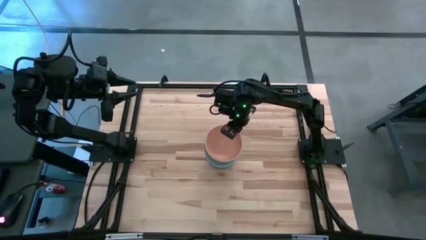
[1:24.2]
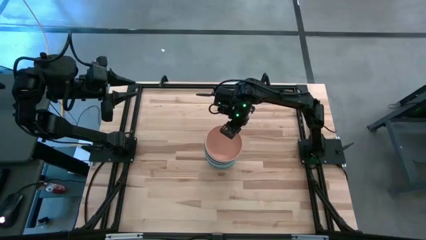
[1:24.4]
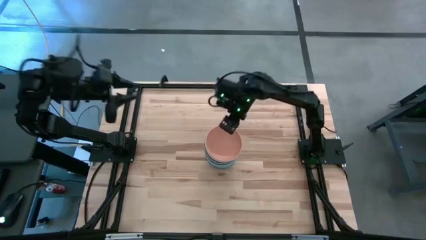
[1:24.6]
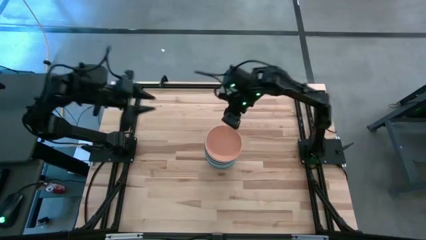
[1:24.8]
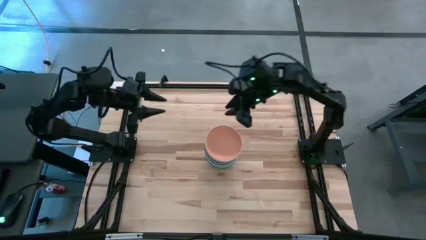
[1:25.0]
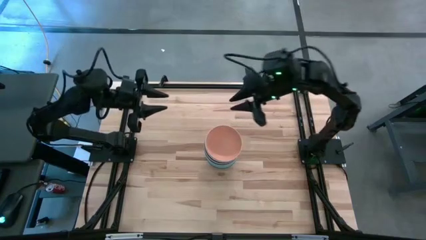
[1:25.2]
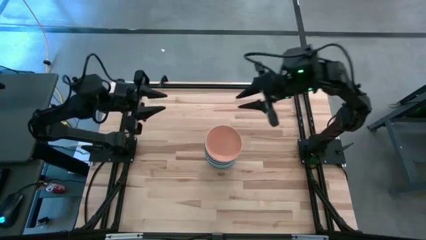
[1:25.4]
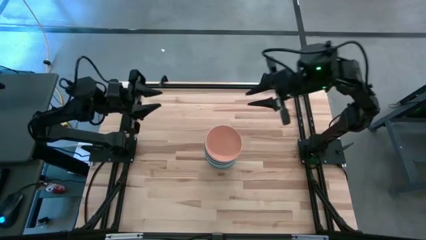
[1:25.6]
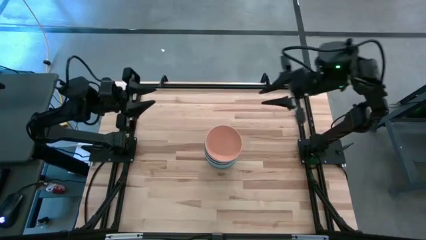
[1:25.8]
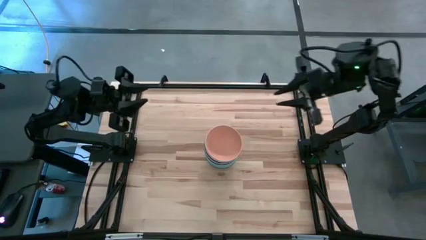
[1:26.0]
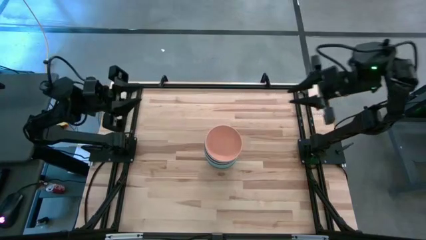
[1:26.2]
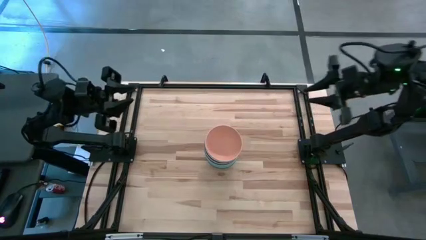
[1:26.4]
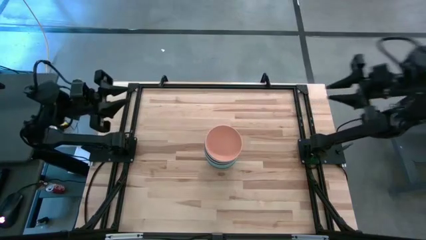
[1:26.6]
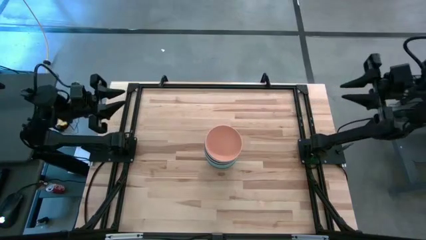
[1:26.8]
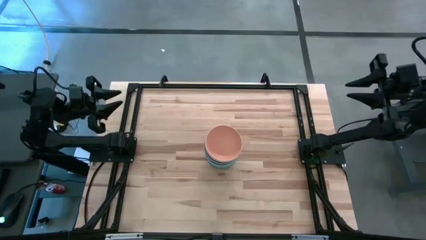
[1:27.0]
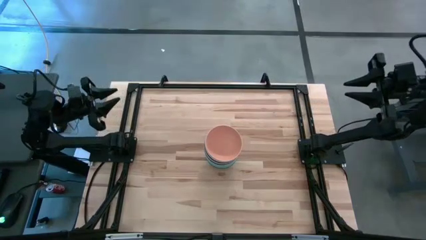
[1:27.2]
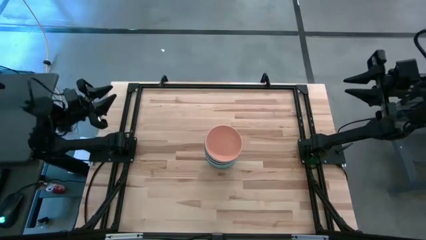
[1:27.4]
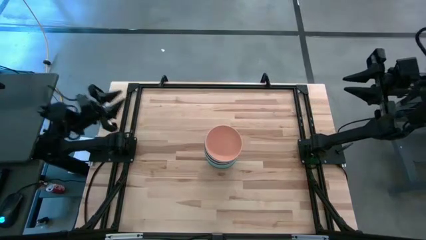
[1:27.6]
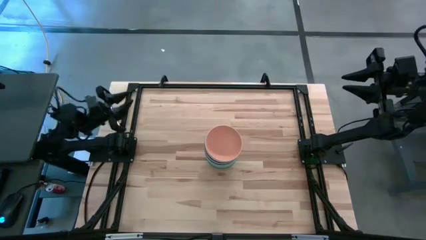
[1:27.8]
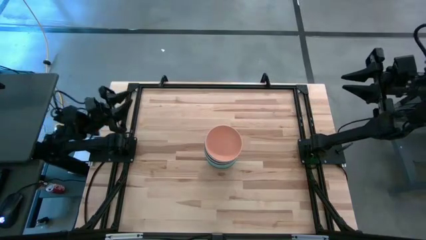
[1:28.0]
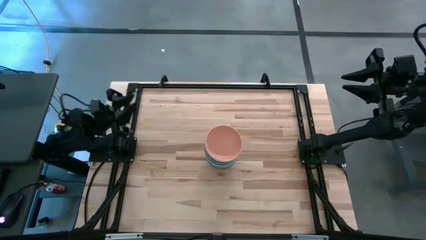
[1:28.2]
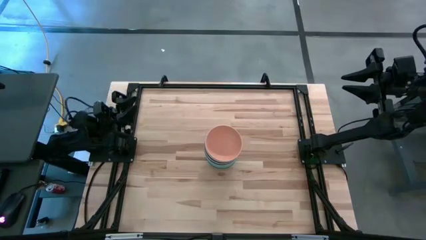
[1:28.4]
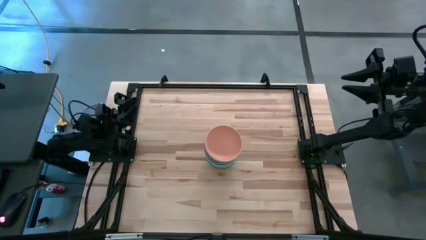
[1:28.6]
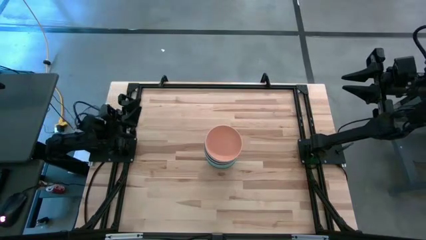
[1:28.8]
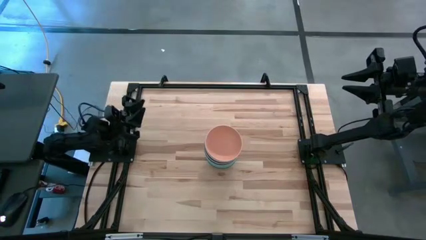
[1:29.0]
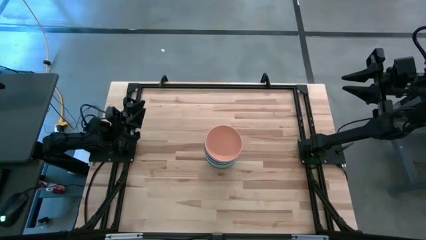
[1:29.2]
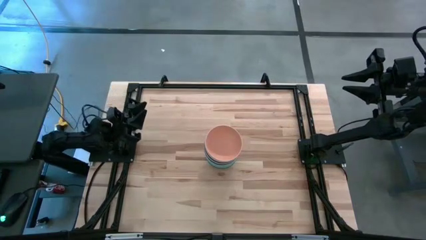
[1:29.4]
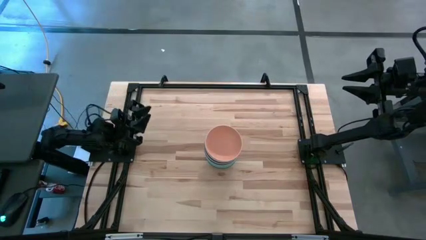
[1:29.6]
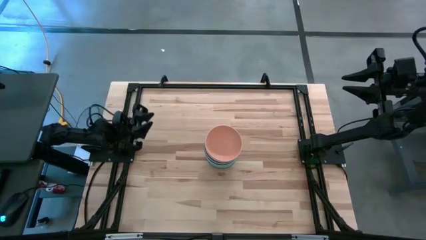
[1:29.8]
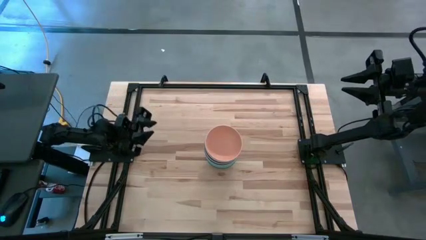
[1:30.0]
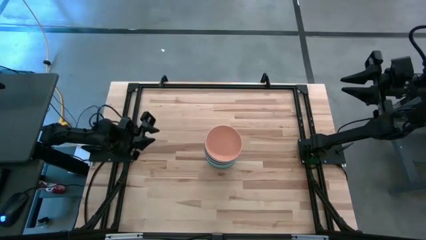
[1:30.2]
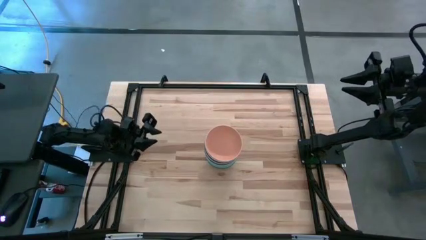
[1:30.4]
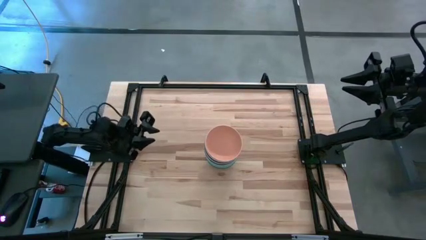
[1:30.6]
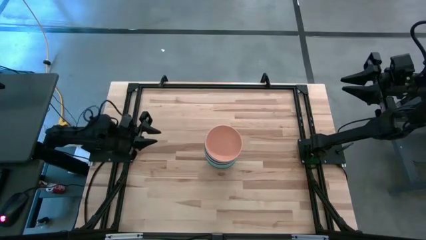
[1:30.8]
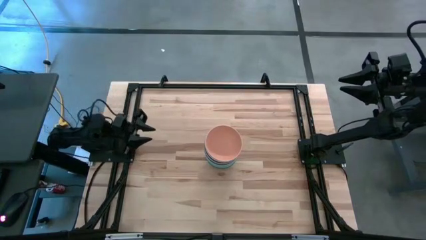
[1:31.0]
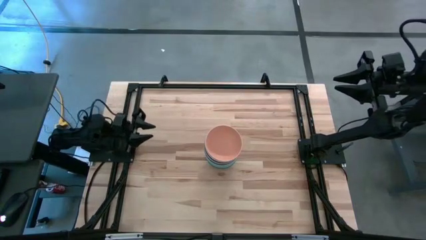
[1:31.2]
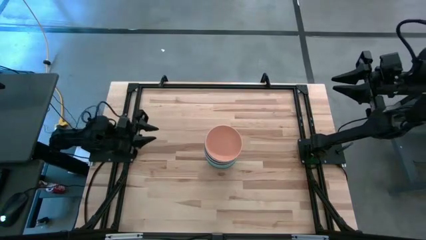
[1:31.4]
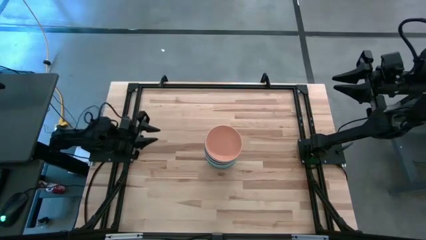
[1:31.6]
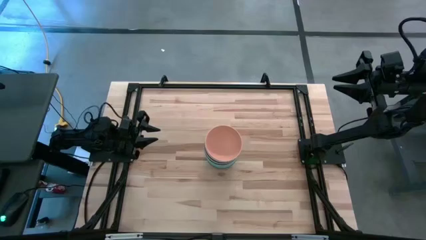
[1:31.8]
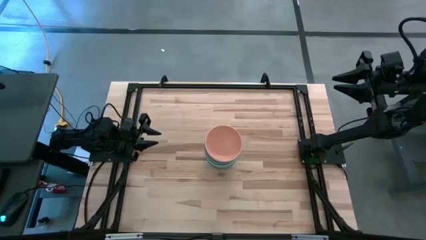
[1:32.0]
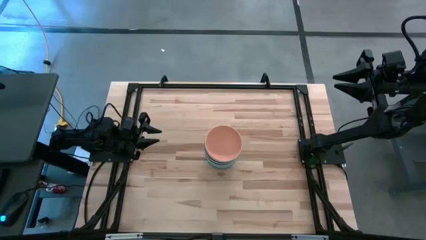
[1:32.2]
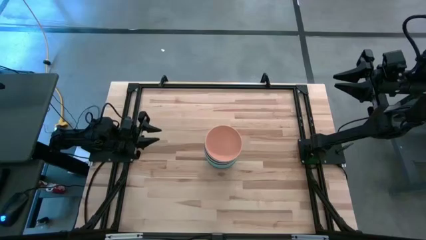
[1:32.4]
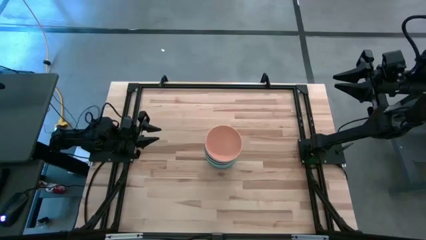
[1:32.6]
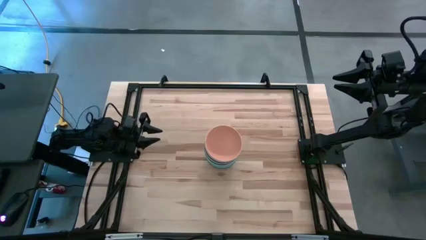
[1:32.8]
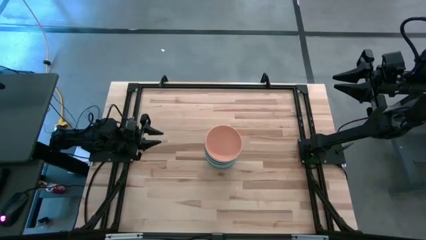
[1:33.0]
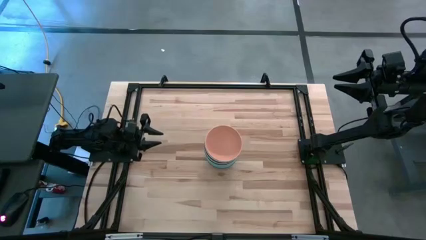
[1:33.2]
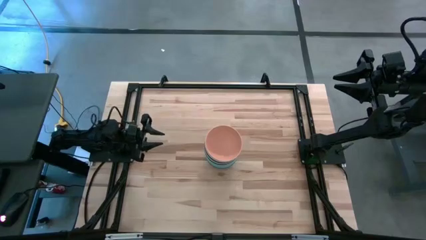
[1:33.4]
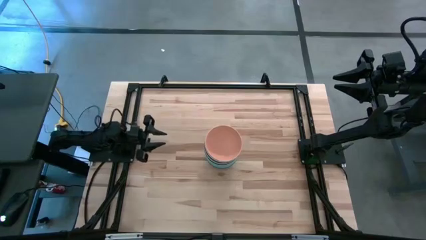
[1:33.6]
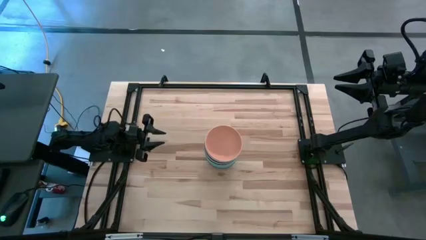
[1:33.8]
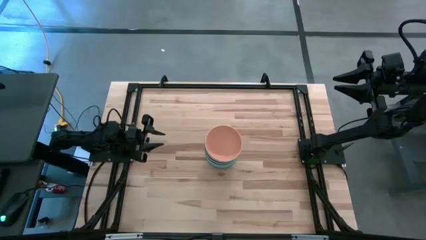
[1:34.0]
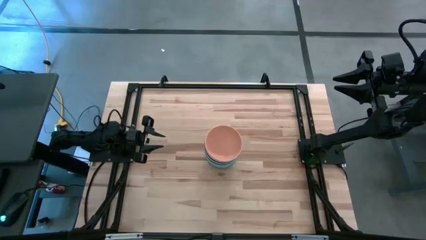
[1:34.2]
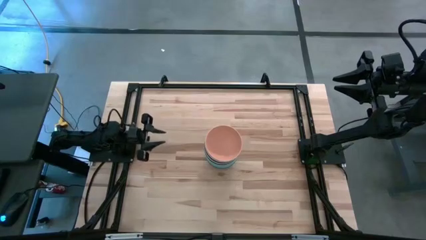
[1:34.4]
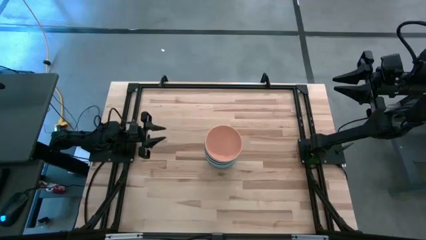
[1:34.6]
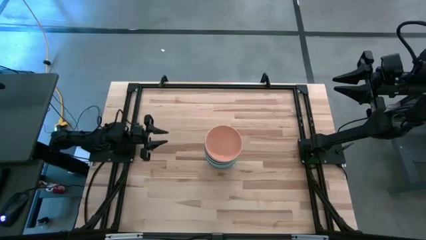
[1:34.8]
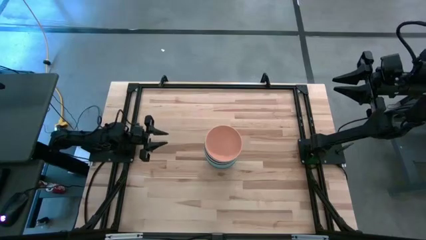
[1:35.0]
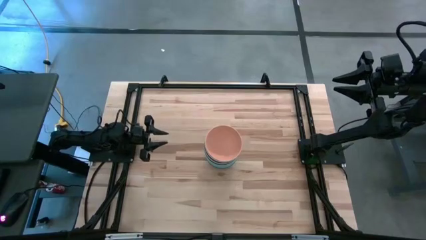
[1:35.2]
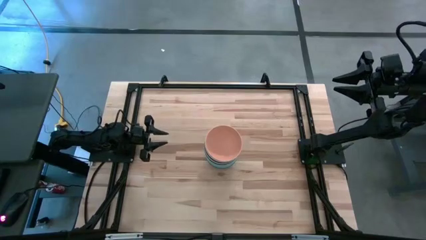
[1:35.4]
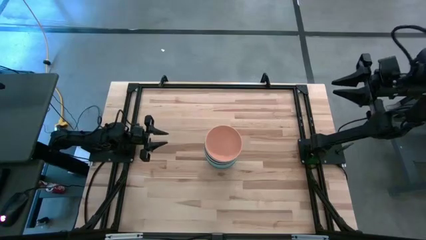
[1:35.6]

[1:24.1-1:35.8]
Task: Nest bowls inside each other
Return to Home Position

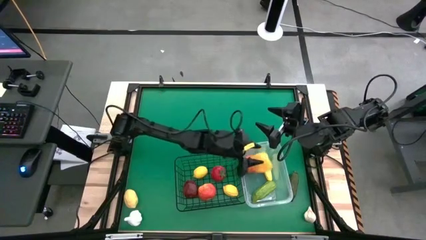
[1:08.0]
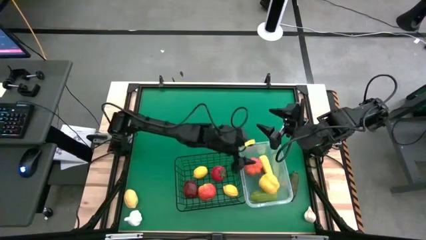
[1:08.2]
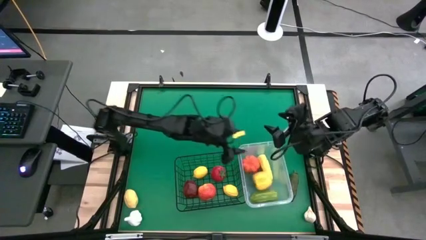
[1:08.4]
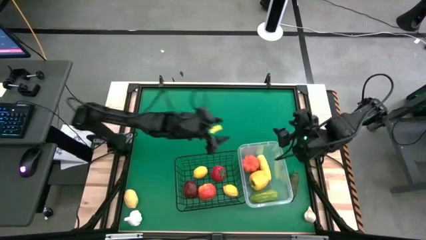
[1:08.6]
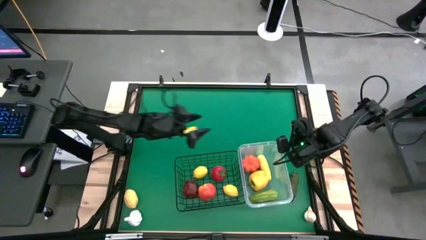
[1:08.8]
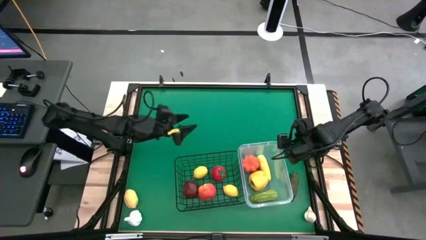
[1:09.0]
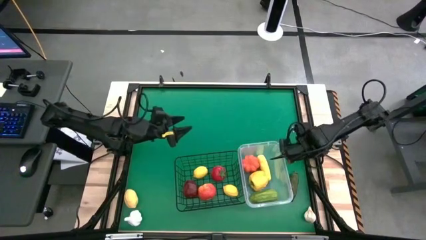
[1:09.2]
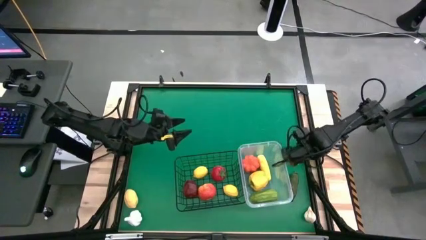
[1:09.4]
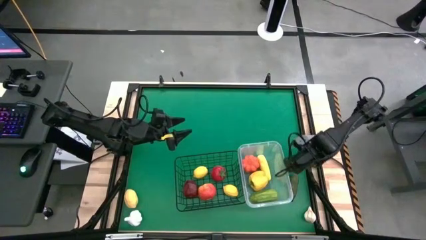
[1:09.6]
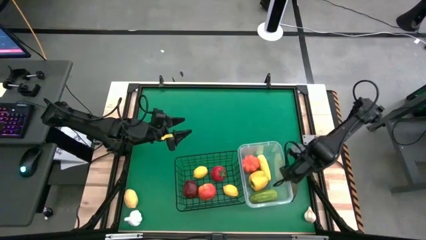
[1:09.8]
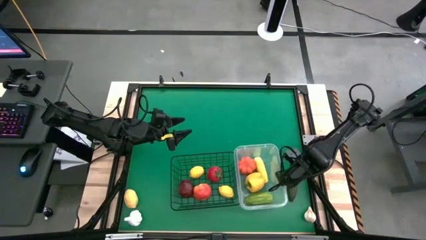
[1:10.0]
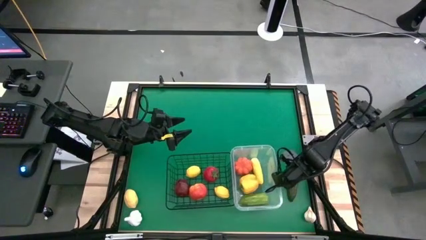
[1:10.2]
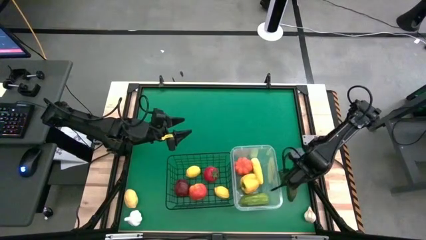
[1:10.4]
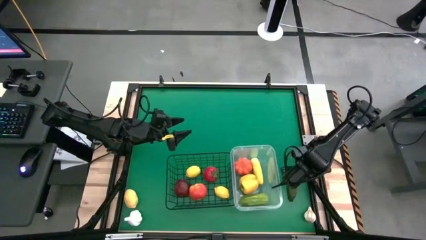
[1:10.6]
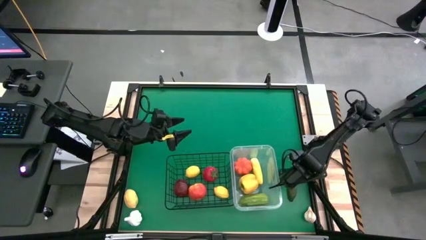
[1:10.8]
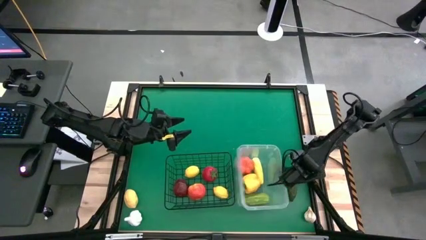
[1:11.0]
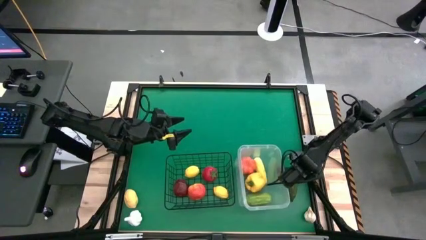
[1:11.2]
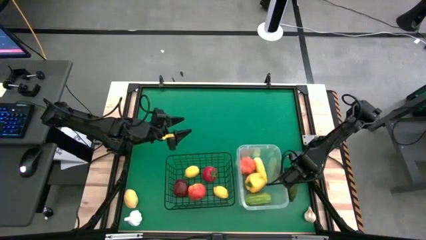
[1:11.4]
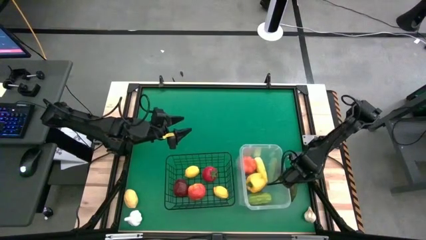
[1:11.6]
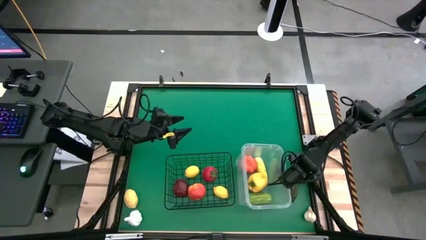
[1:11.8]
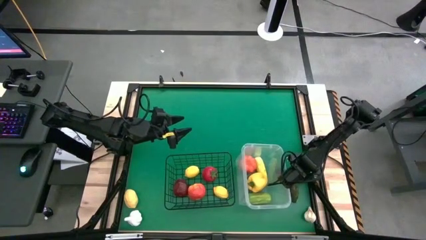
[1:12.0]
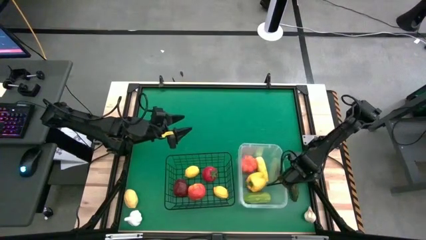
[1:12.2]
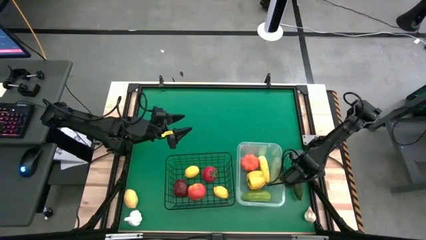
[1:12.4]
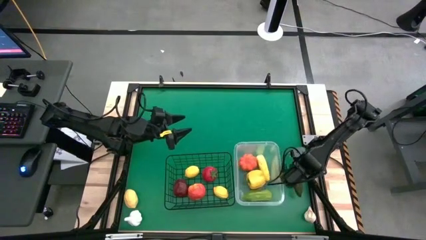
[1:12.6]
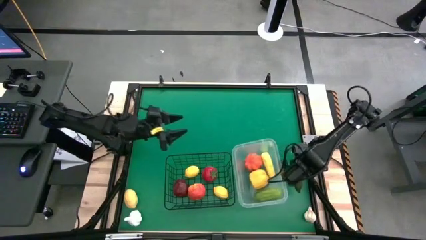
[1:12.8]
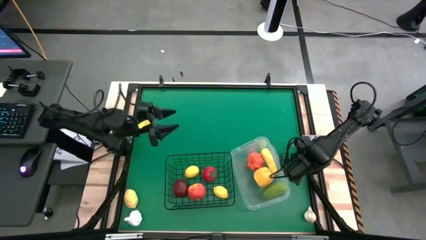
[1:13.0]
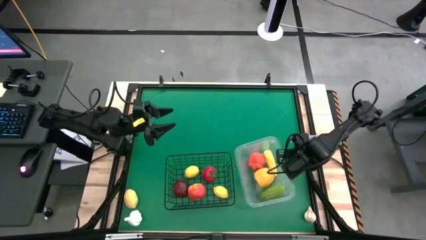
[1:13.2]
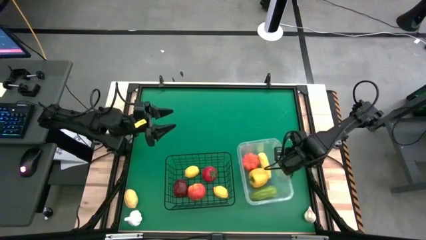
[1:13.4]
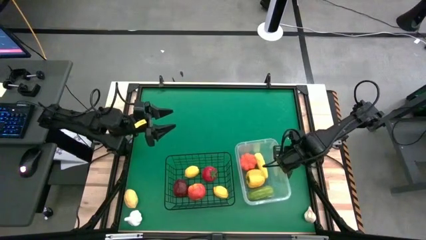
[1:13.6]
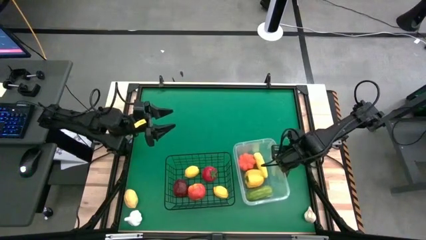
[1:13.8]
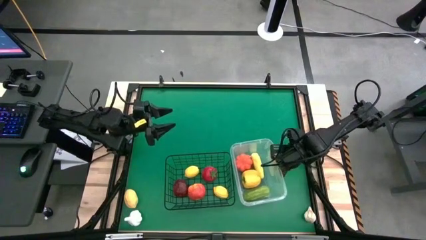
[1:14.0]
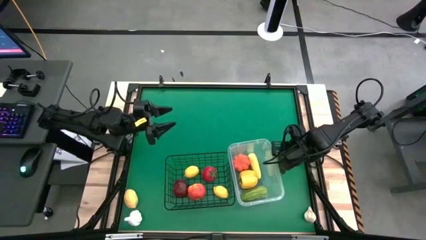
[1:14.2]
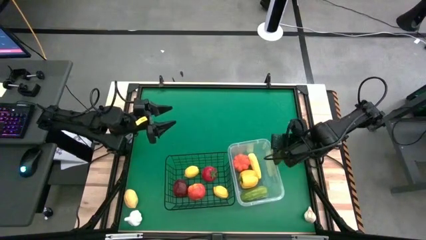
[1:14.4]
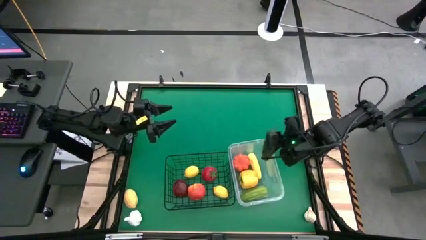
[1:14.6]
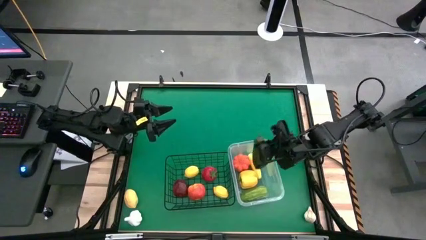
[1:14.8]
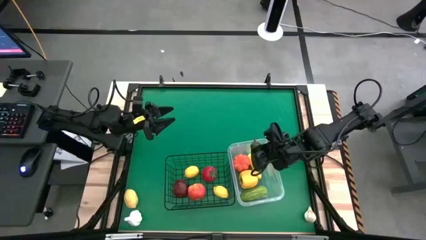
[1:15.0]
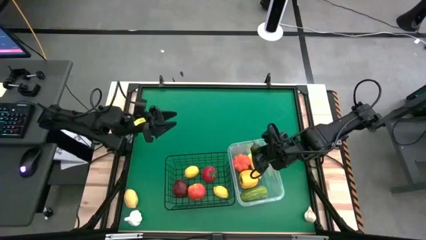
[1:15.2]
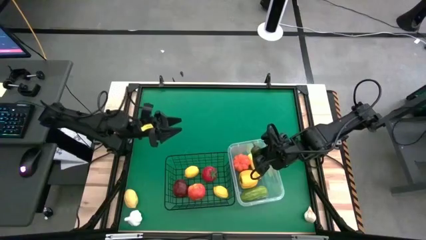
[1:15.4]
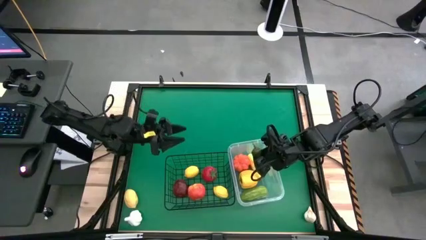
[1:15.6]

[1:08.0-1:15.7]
Task: Sort produce into baskets
Put the chili pepper into the transparent bin
